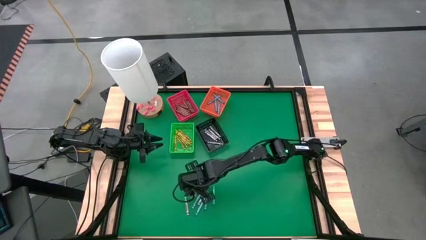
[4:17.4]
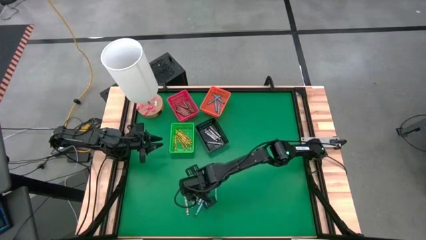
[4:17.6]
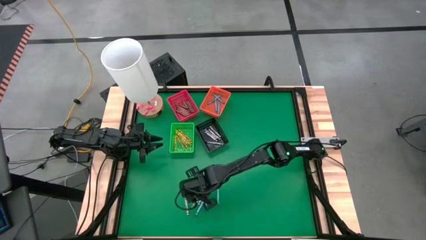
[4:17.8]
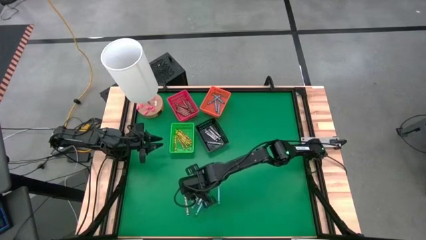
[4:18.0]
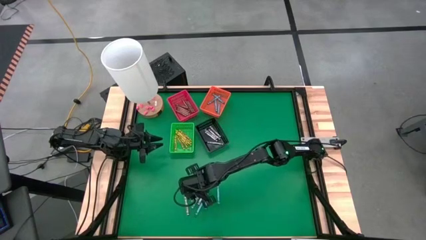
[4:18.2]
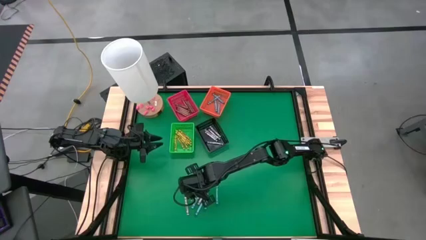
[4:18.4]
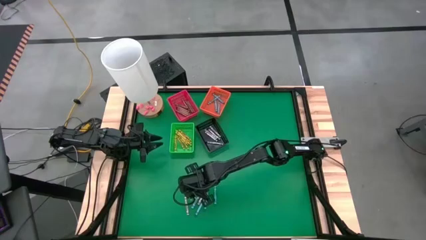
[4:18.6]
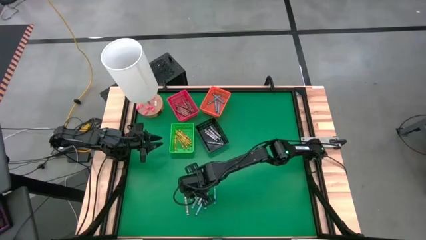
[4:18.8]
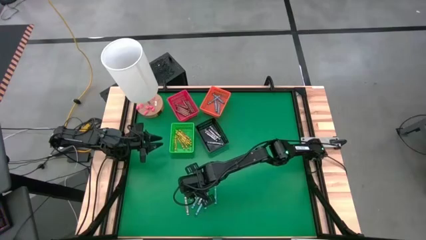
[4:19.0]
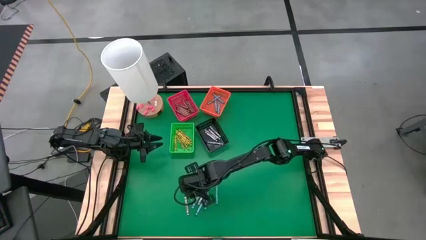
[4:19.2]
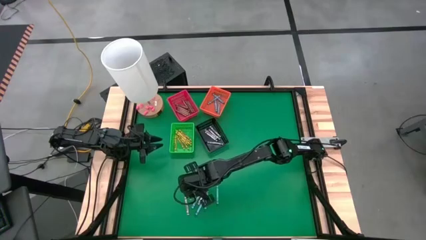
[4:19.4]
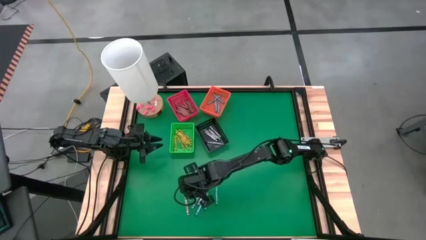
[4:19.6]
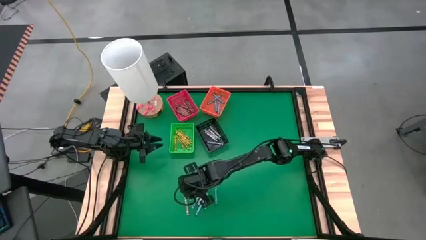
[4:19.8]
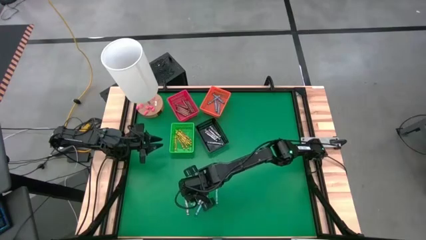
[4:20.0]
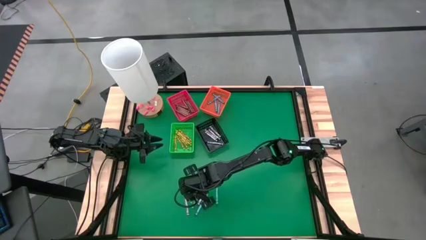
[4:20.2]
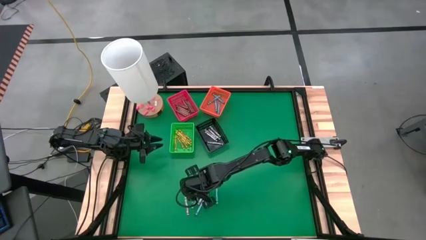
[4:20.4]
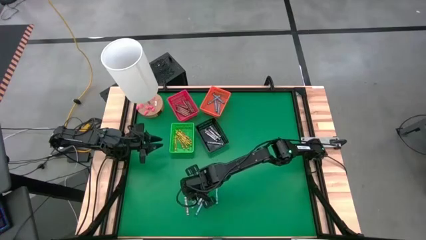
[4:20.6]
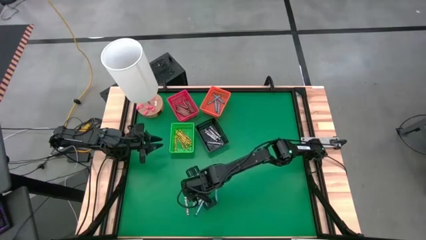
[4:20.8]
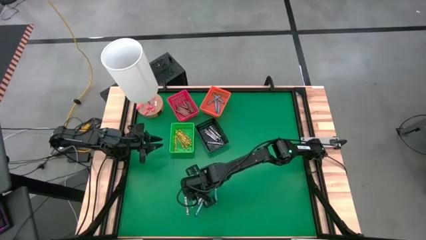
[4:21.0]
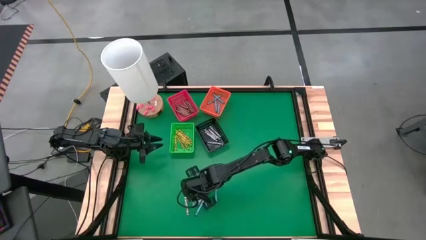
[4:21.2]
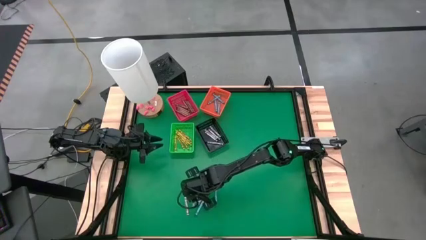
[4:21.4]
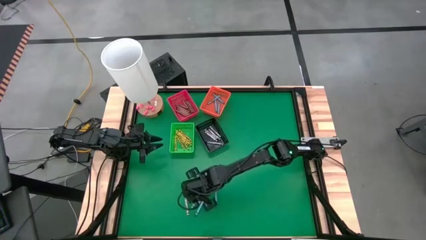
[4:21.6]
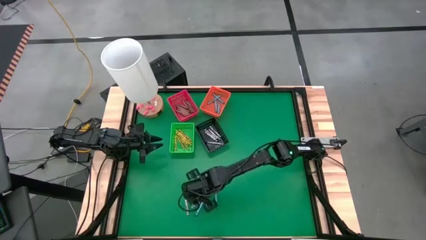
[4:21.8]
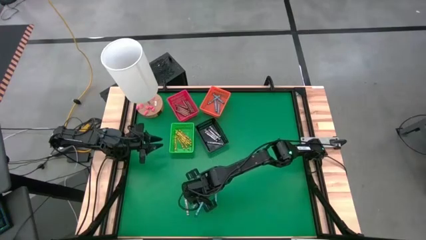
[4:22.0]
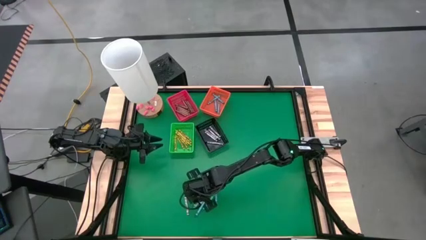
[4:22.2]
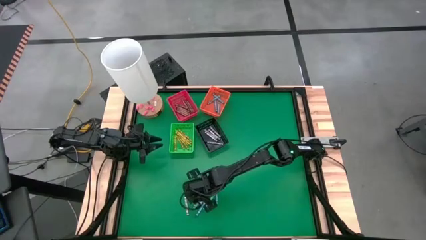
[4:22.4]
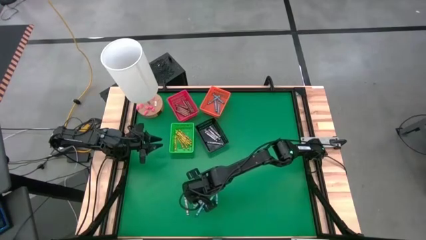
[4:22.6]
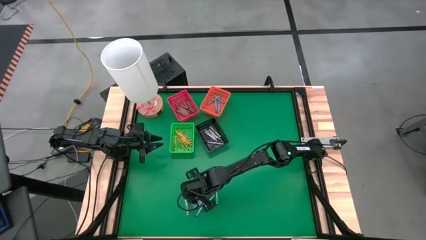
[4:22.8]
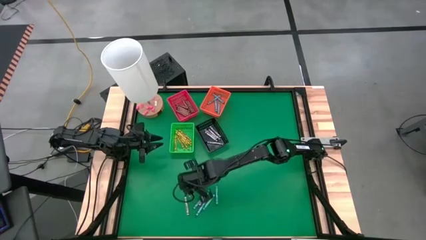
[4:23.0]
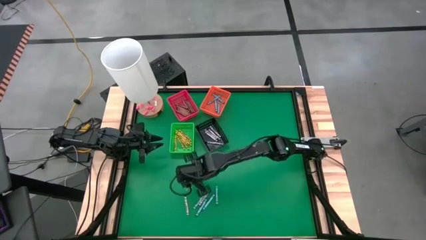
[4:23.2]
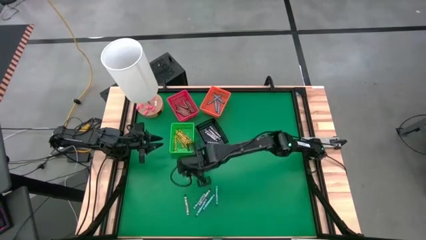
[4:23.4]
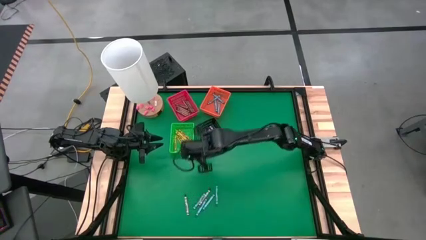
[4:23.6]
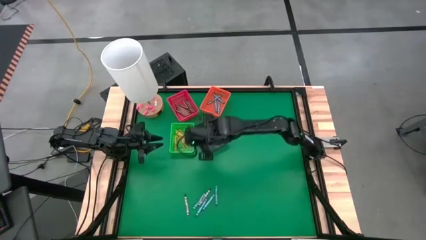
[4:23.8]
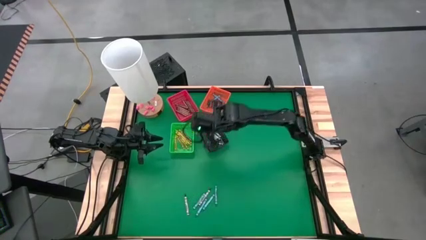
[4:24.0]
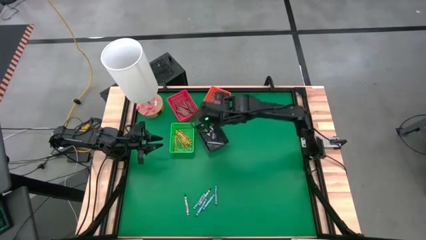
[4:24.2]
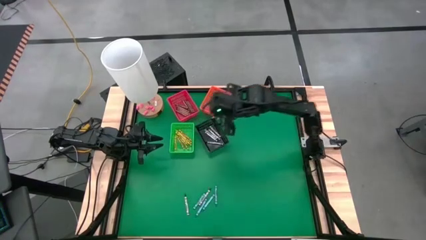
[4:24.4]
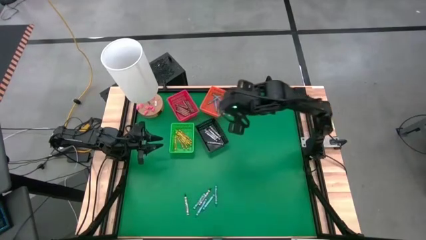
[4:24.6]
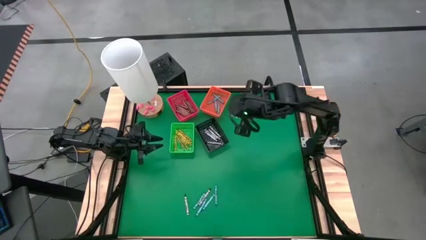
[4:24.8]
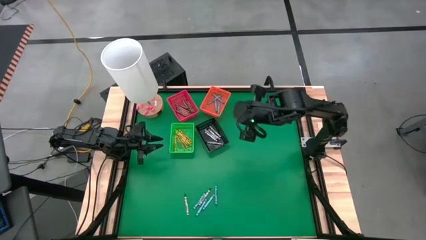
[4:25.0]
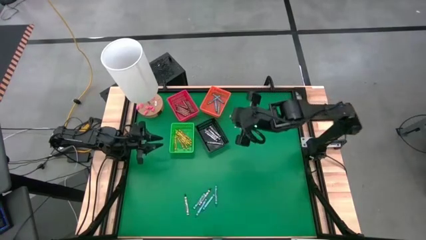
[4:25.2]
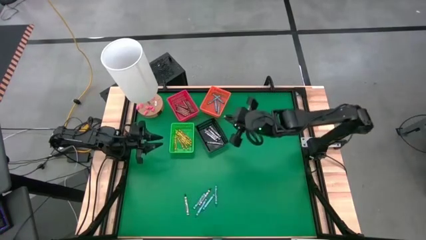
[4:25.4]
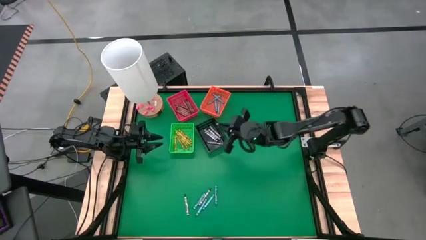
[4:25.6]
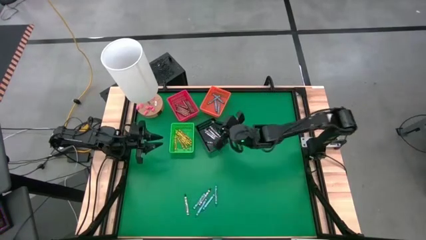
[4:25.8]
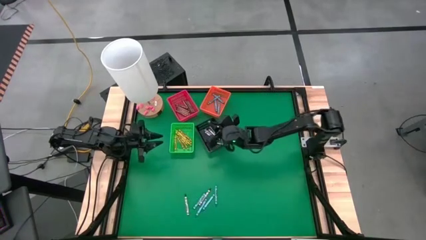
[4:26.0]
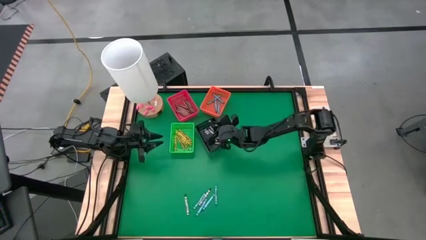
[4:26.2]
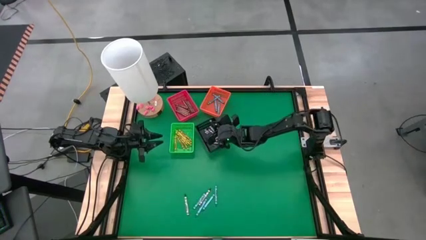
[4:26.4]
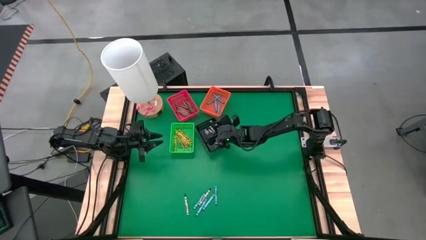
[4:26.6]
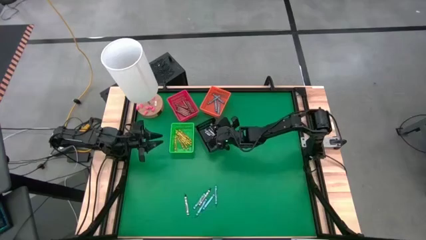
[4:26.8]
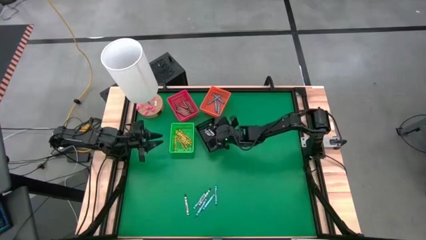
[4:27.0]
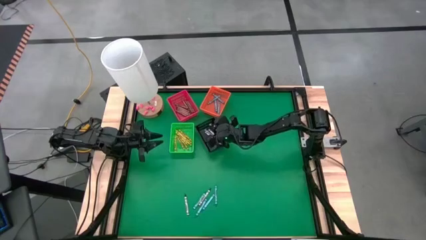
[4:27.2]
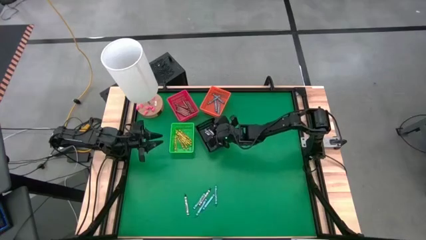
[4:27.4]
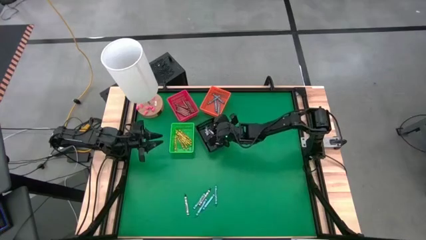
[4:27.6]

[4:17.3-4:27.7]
Task: Sort crayons
Put the black crayon into the black bin

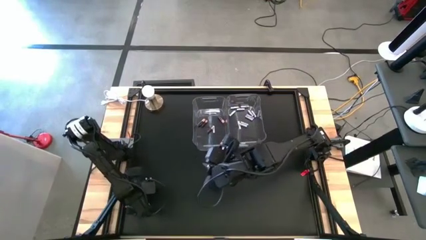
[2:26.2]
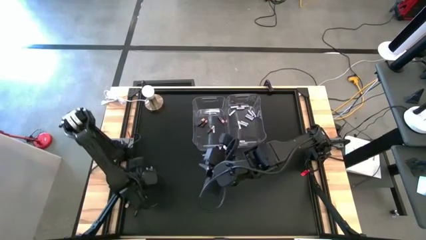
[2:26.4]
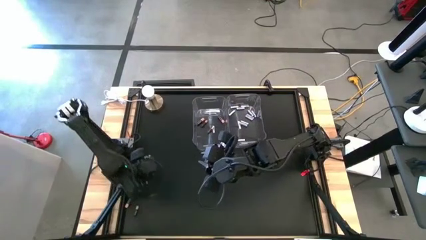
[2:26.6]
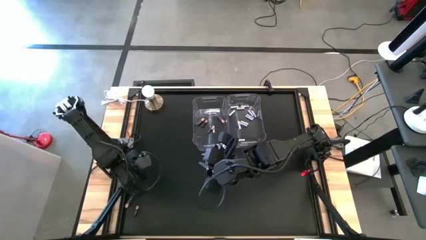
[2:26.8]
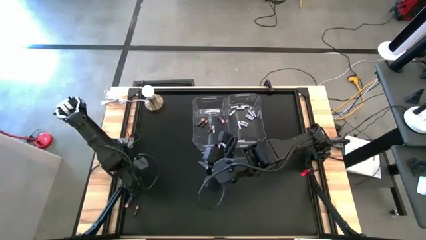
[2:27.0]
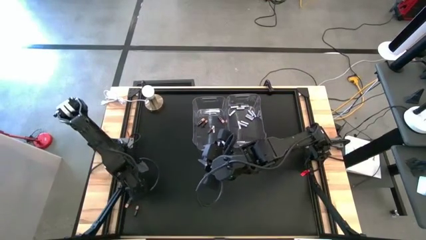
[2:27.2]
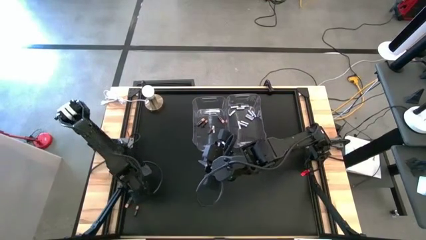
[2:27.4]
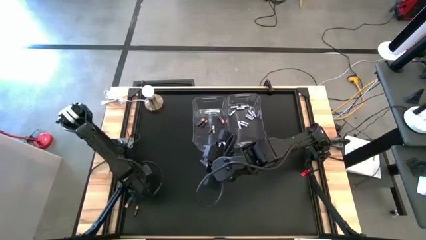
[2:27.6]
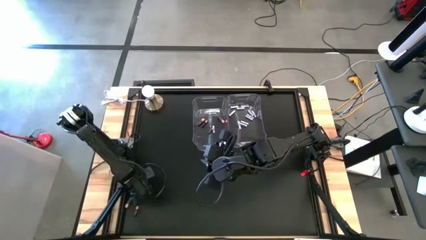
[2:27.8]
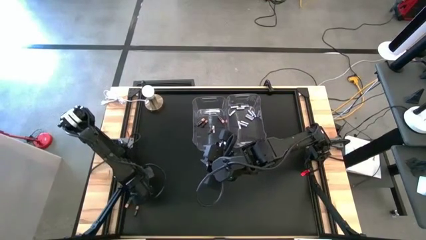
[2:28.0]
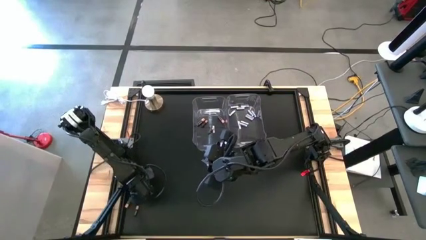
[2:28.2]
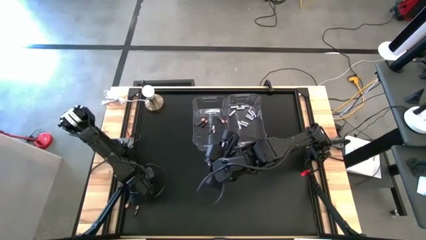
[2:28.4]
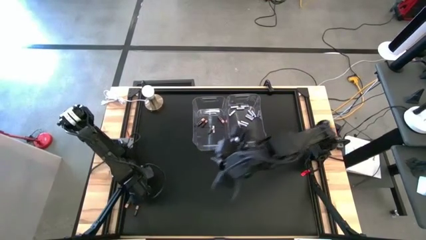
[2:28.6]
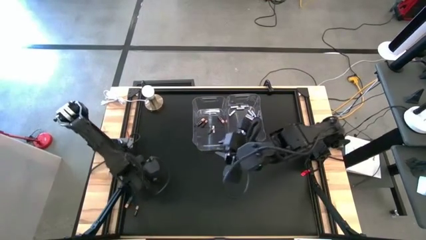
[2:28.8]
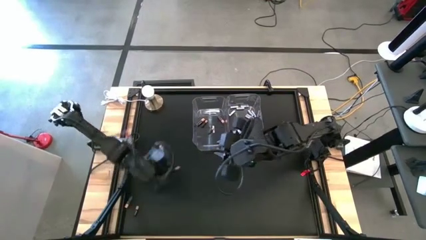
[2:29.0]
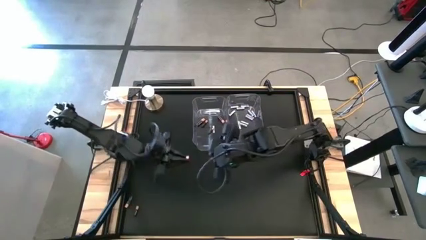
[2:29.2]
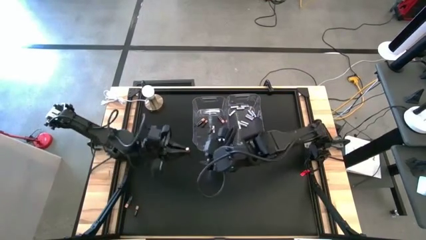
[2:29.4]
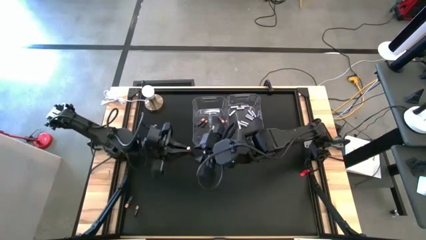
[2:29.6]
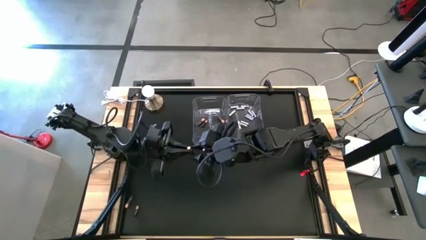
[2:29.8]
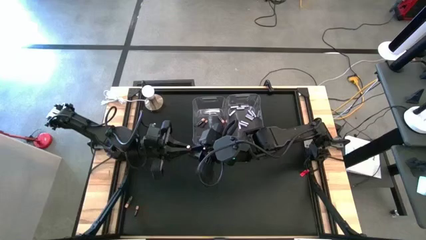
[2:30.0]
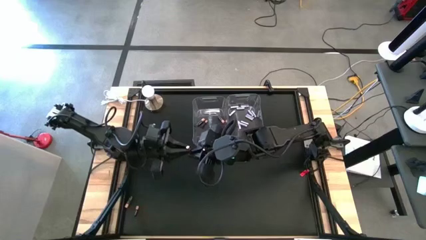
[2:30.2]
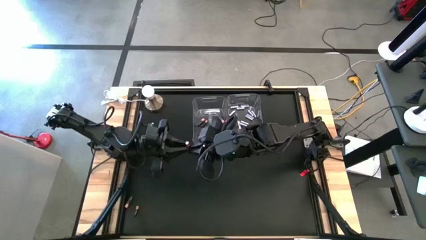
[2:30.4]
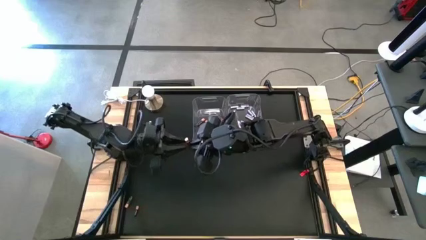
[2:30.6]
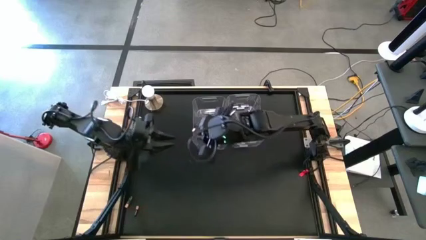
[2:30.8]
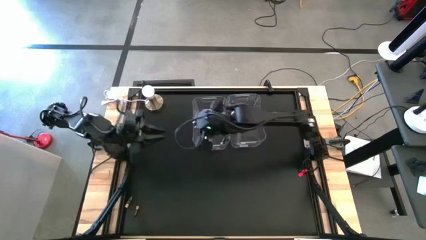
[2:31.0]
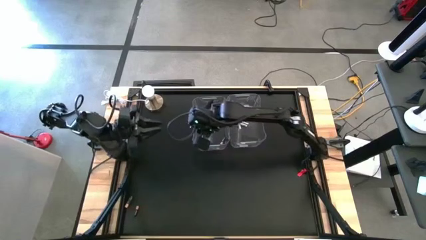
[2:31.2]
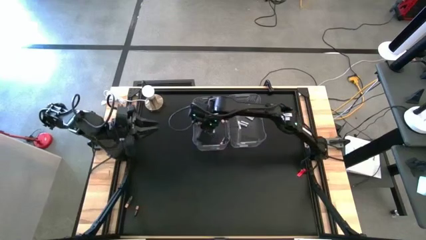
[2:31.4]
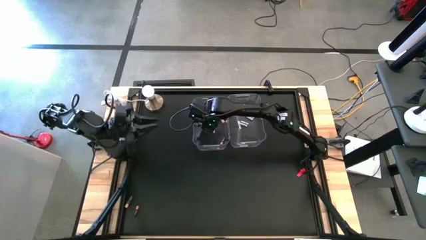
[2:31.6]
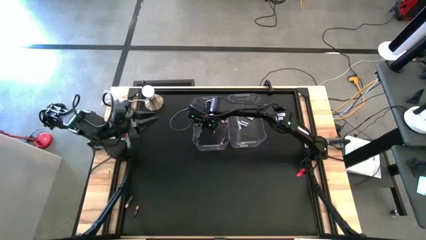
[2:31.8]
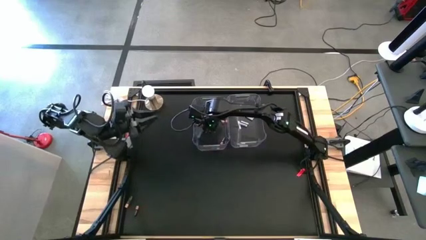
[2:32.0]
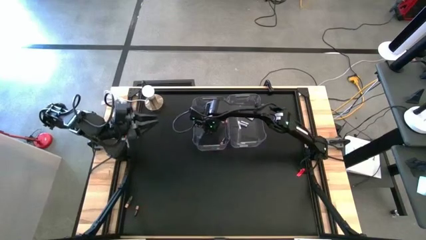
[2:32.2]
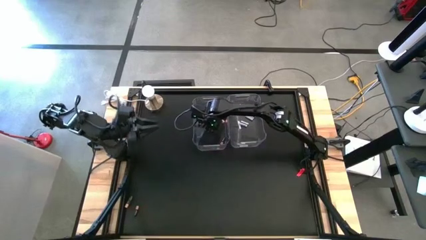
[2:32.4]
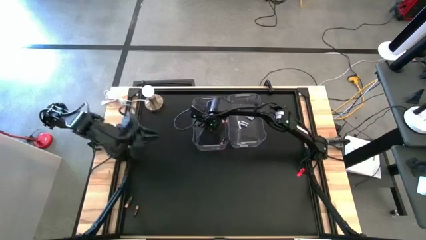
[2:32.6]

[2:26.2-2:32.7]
Task: Sort batteries
Put the black battery into the left transparent bin
